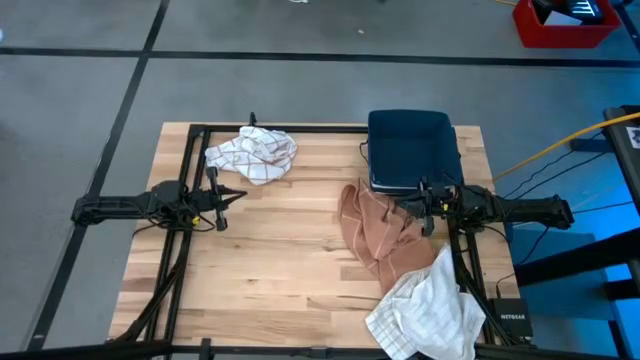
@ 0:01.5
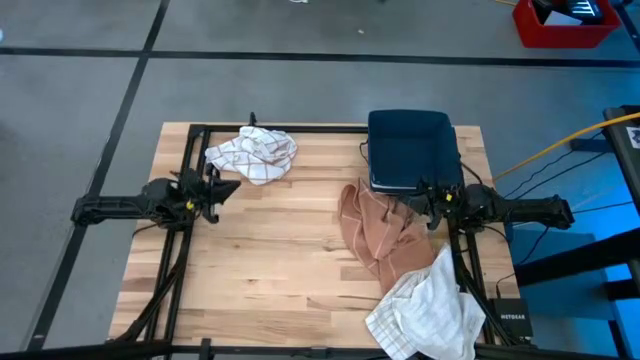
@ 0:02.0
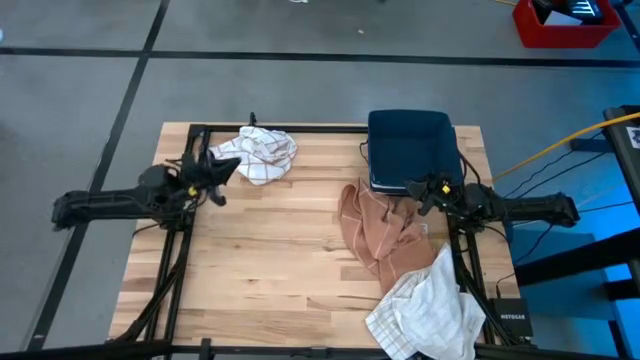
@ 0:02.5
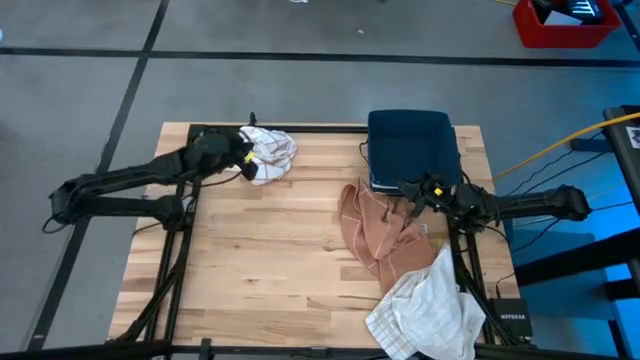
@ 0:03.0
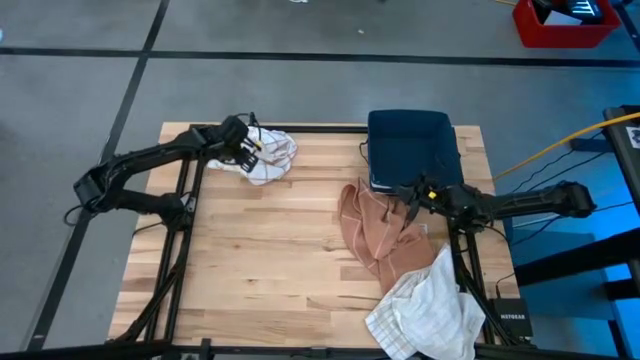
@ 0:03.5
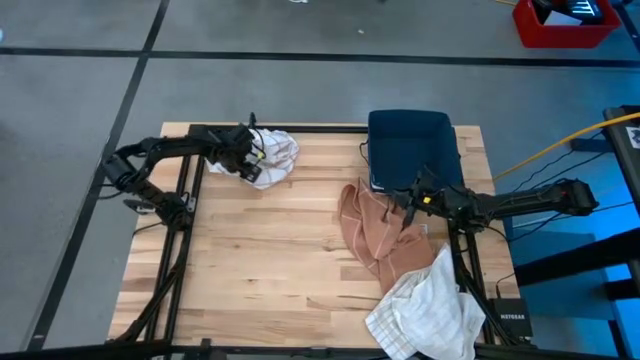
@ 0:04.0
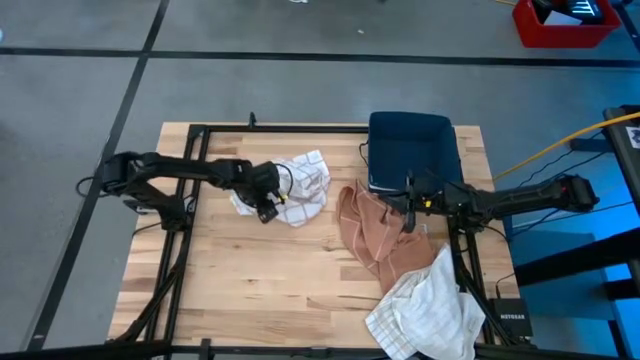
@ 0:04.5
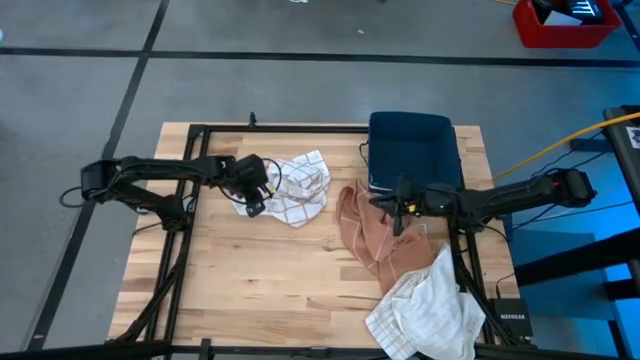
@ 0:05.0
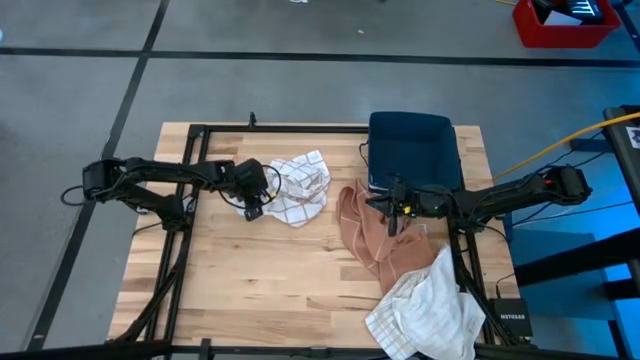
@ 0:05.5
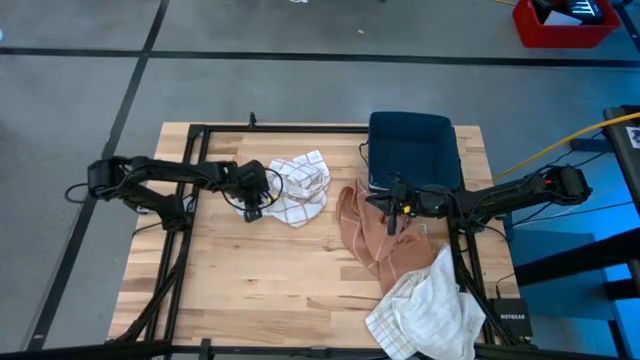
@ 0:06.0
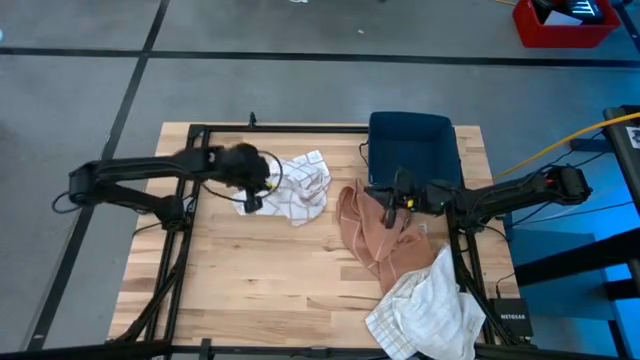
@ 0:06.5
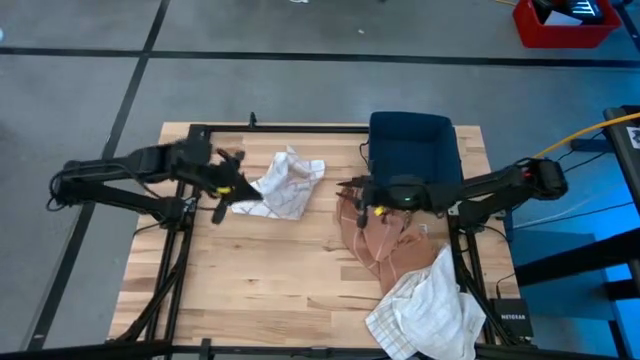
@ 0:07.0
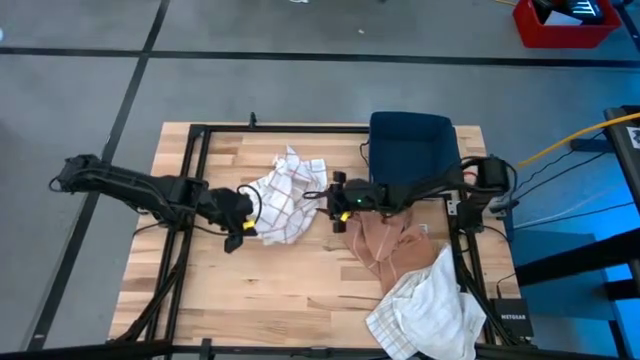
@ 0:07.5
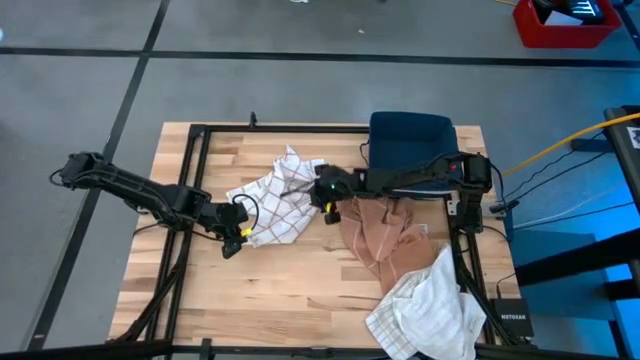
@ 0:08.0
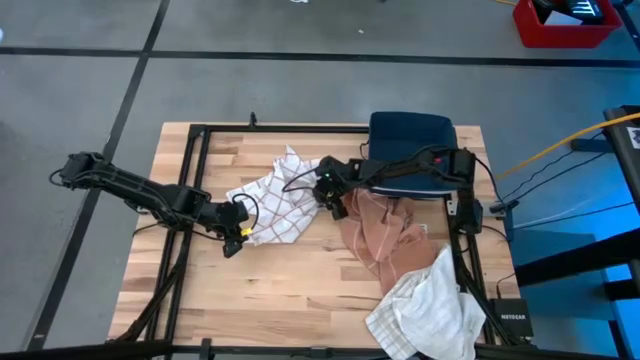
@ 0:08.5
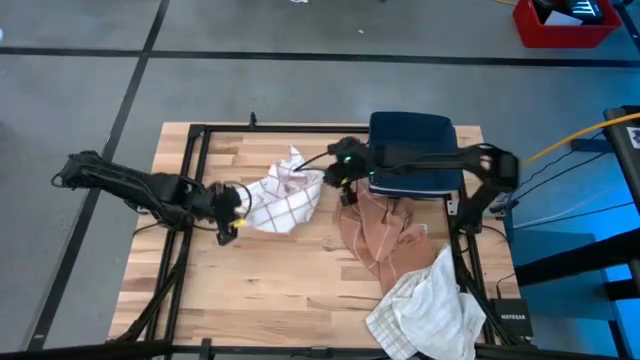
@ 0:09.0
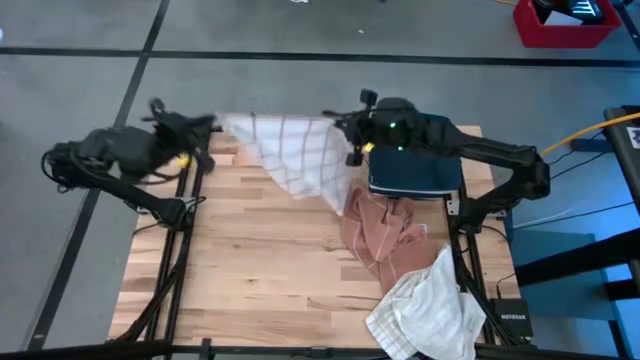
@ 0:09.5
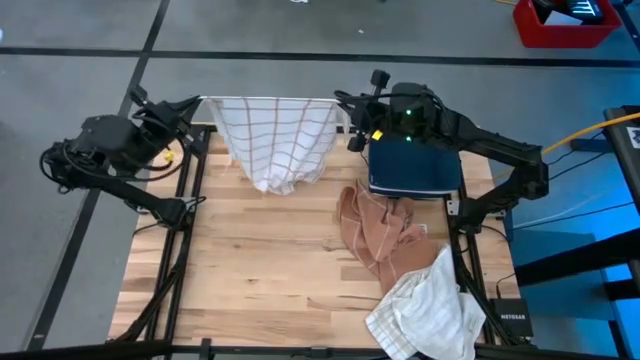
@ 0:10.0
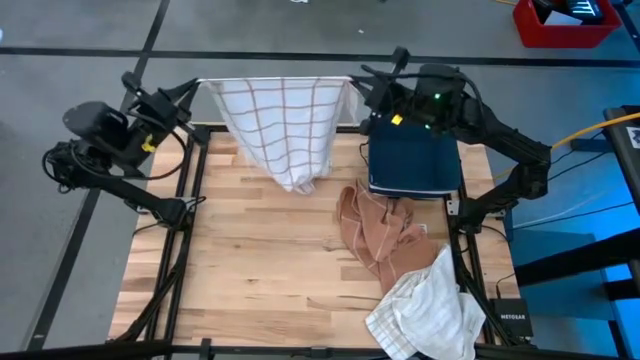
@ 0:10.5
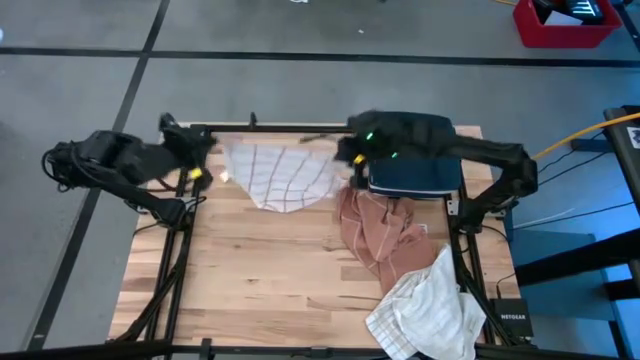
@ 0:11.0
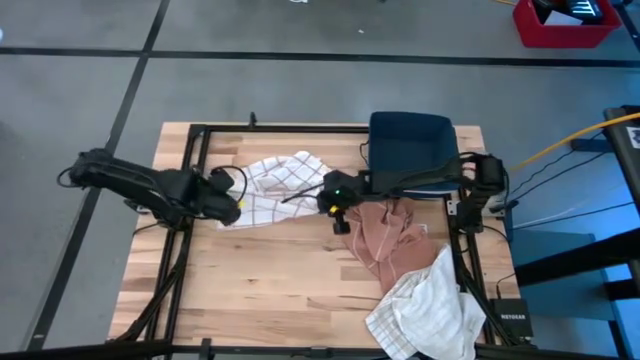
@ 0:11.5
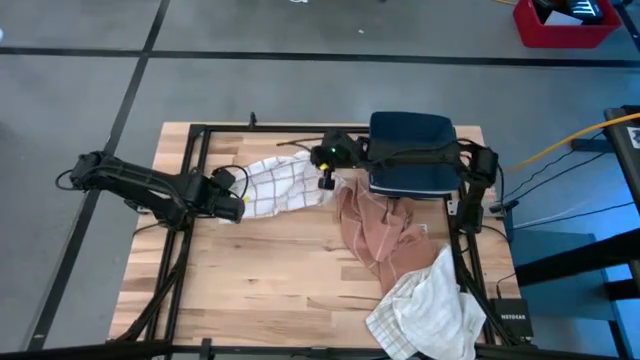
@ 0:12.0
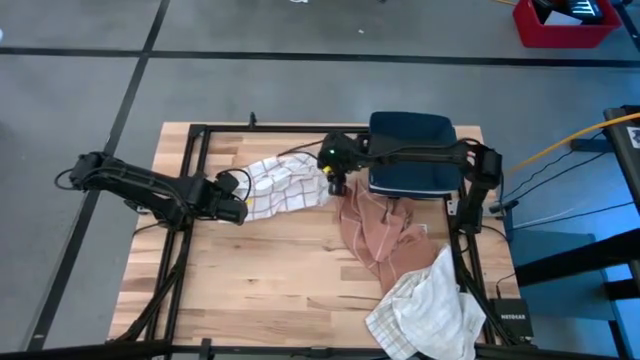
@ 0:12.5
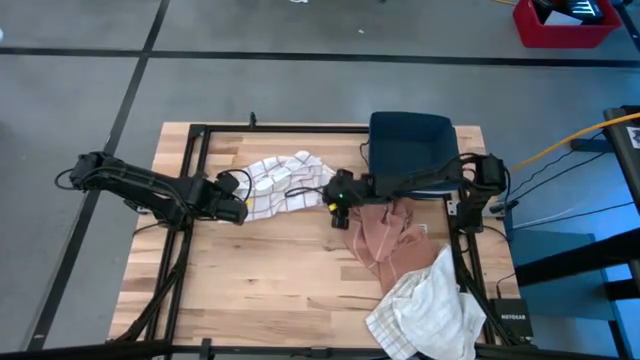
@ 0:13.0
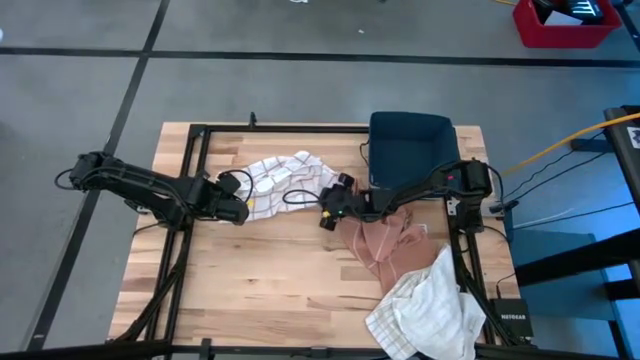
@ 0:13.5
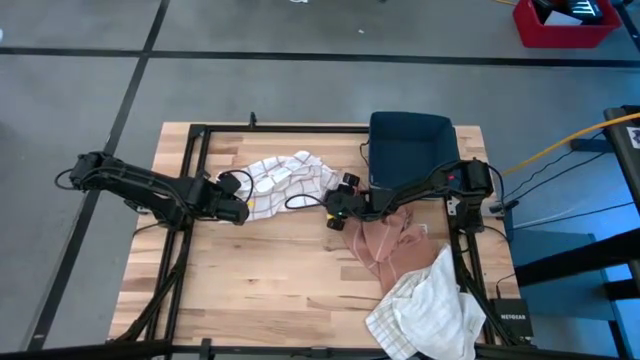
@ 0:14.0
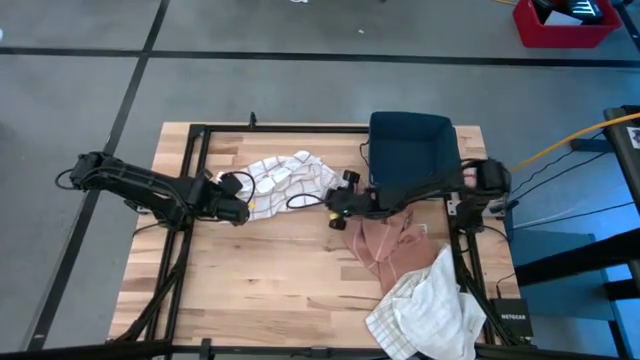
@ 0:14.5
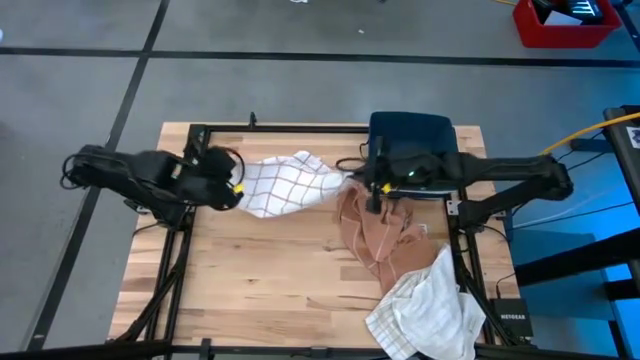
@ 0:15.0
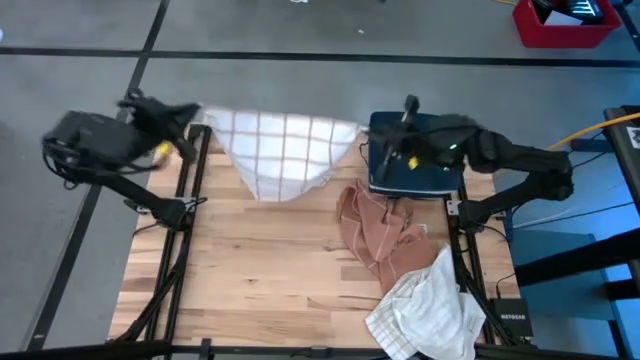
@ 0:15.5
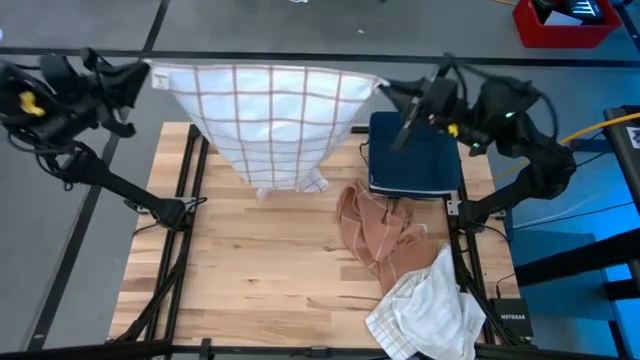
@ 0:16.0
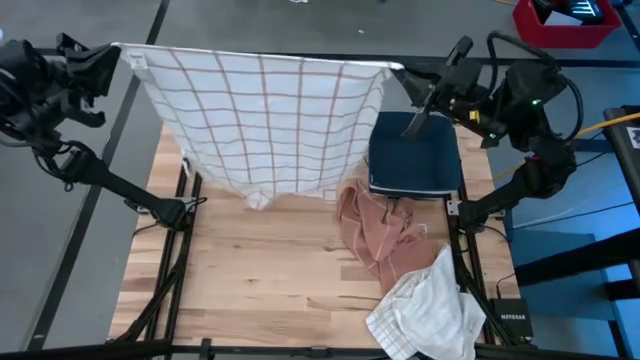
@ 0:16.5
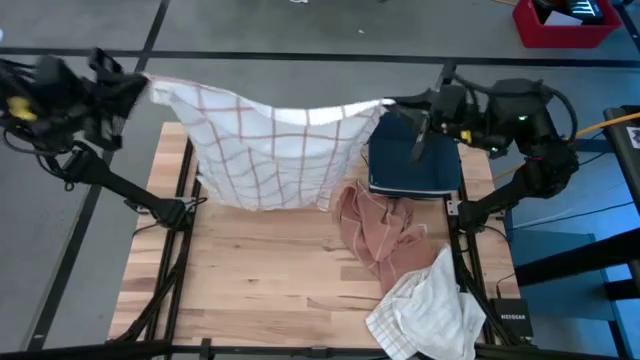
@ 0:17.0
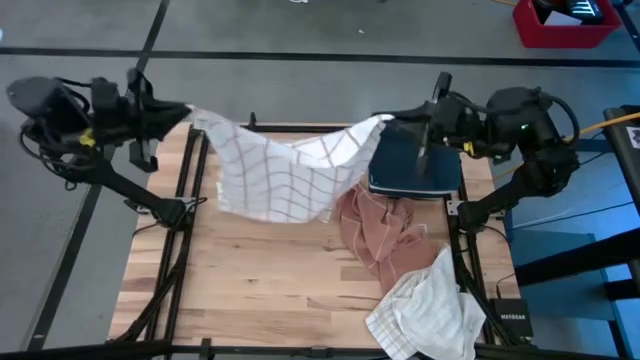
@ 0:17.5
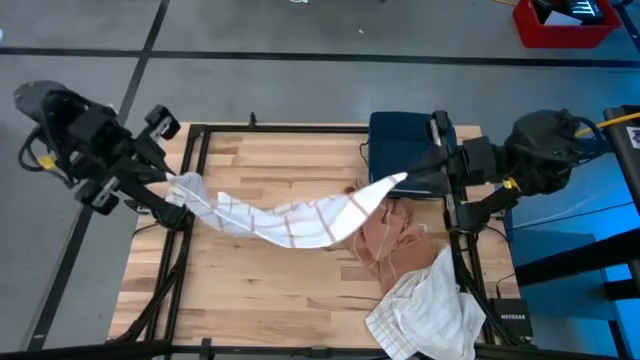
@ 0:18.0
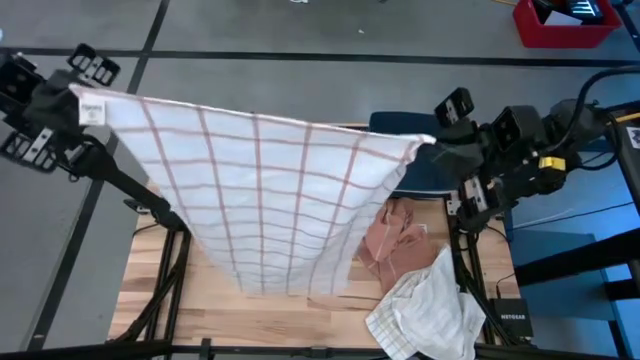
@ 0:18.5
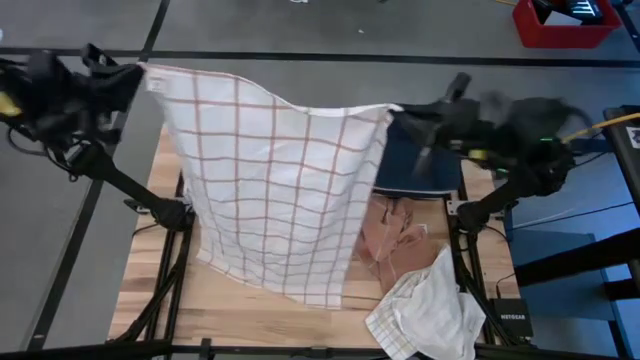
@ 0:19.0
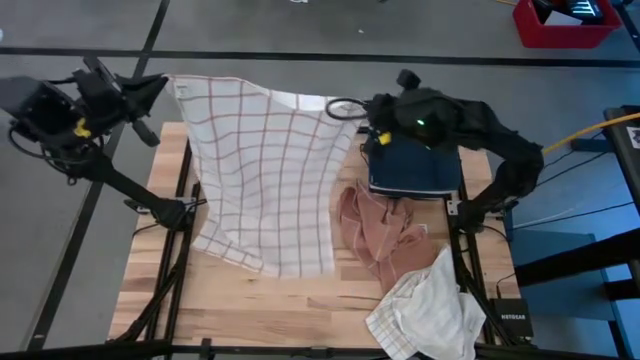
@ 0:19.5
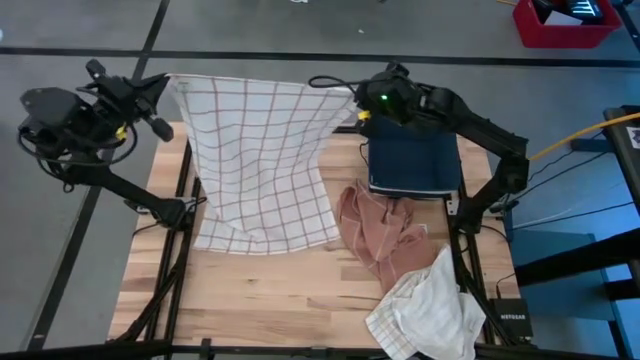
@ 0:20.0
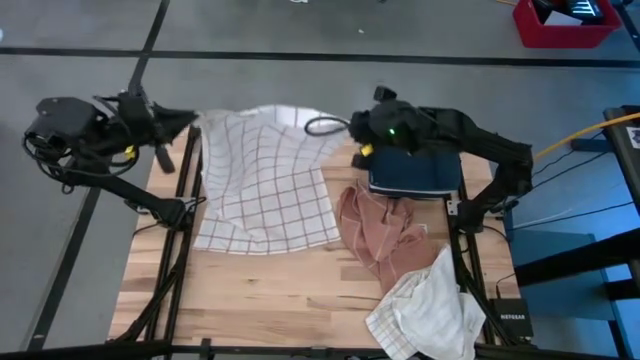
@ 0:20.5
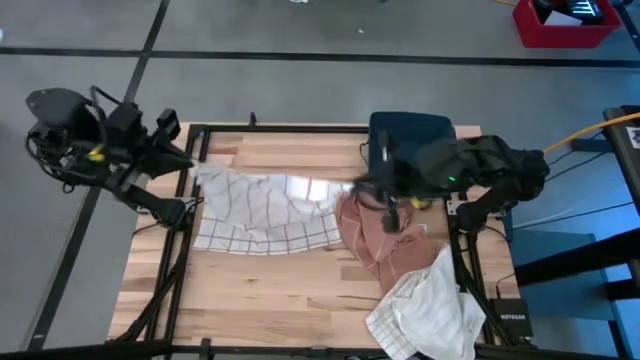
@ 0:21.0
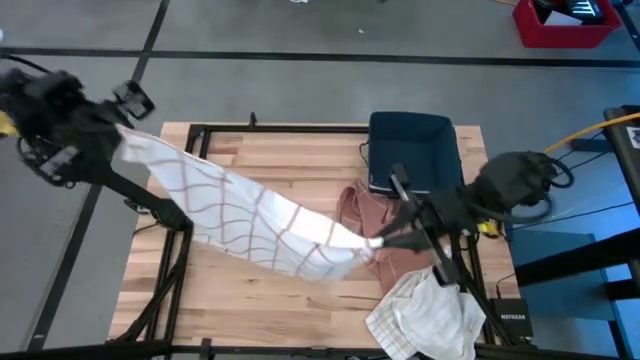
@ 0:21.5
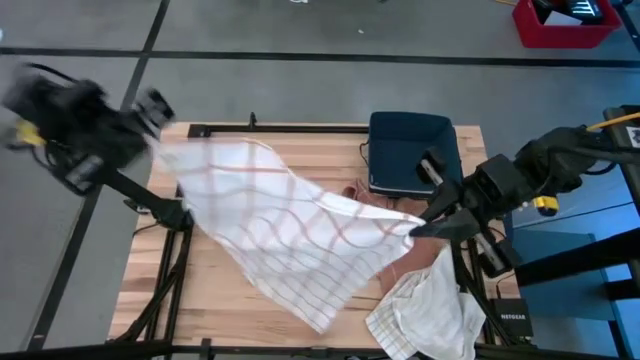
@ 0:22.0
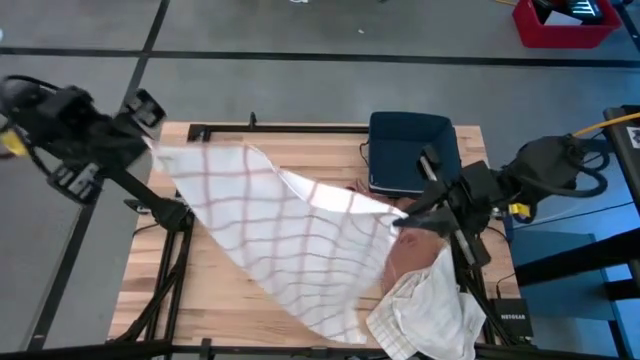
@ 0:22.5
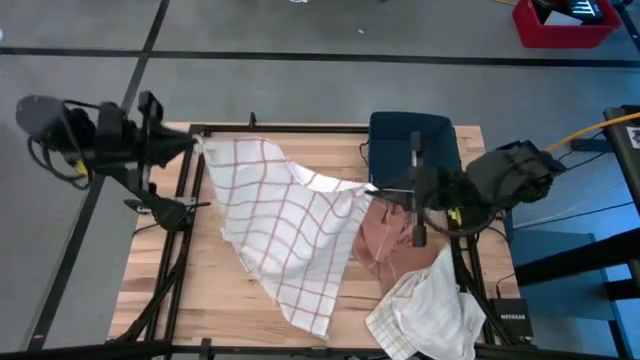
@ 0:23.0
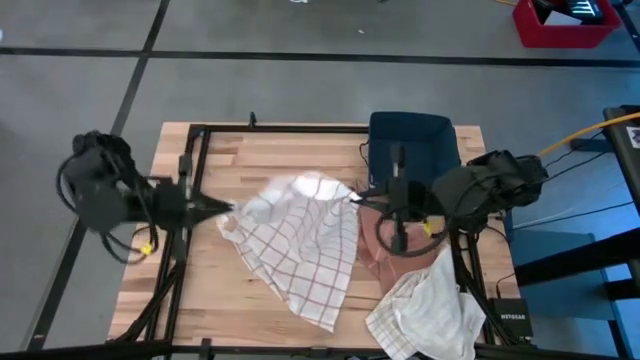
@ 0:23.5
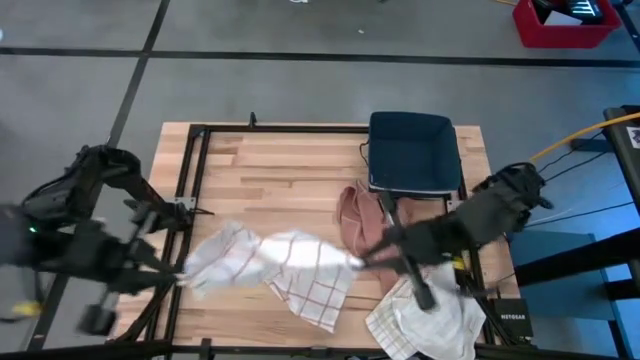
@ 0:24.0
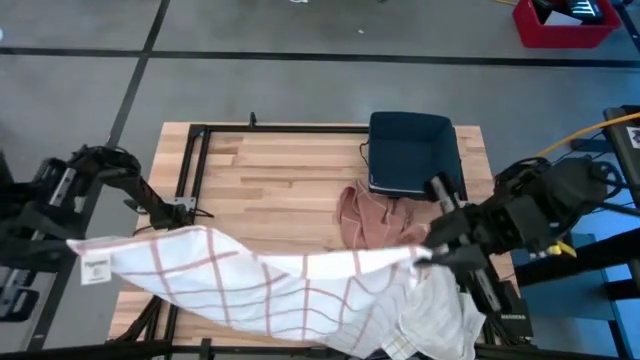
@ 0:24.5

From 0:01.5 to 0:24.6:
Task: Fold towel
Fold the brown striped towel on the table
